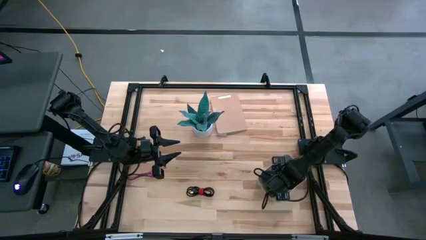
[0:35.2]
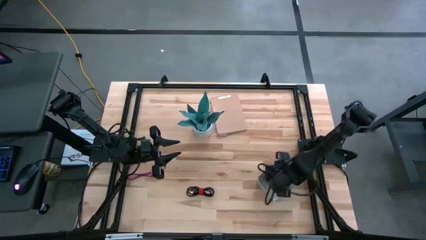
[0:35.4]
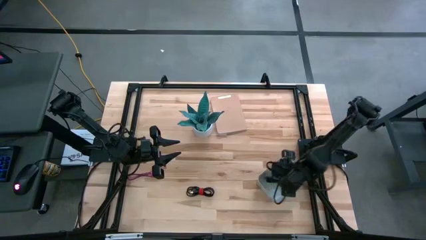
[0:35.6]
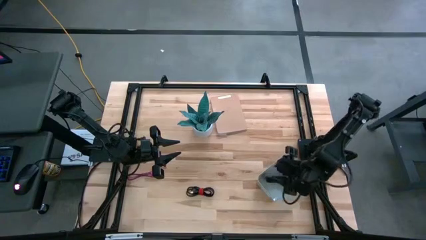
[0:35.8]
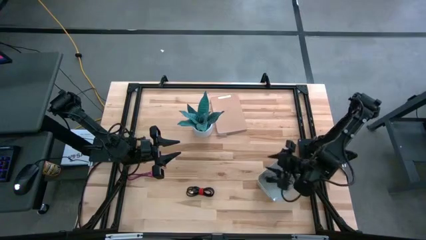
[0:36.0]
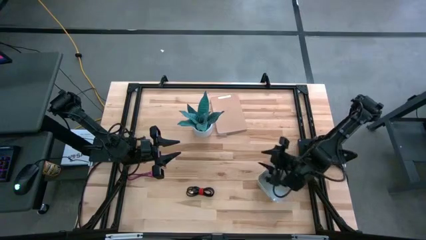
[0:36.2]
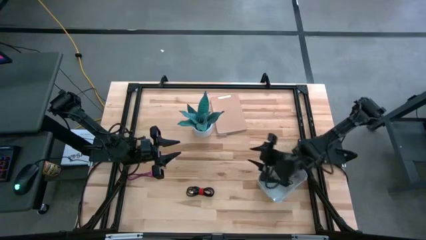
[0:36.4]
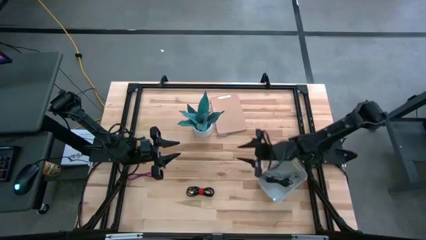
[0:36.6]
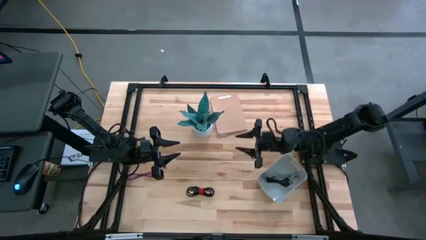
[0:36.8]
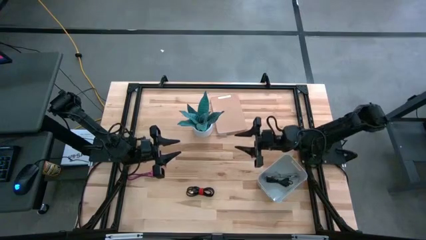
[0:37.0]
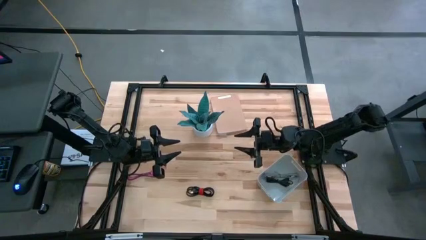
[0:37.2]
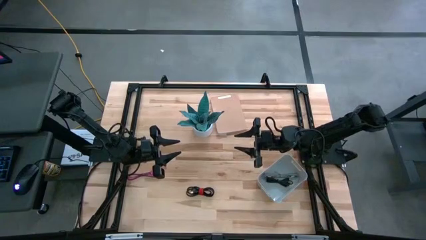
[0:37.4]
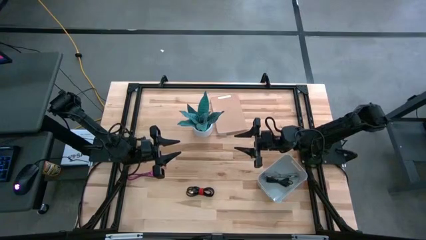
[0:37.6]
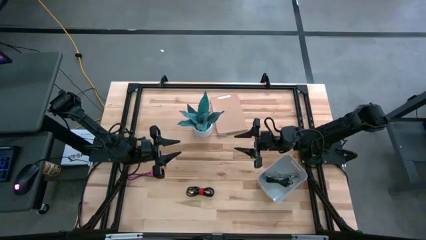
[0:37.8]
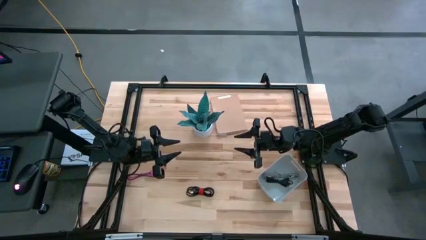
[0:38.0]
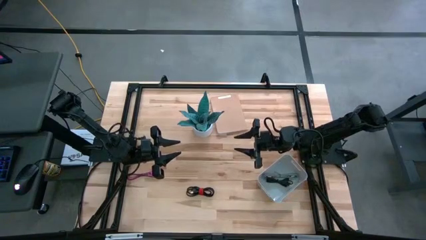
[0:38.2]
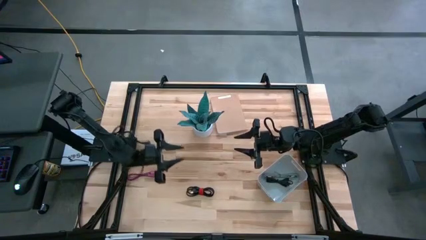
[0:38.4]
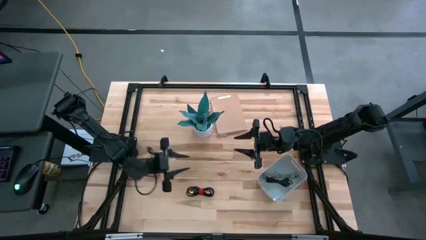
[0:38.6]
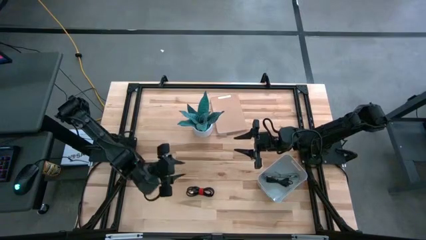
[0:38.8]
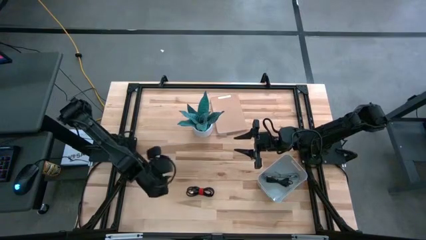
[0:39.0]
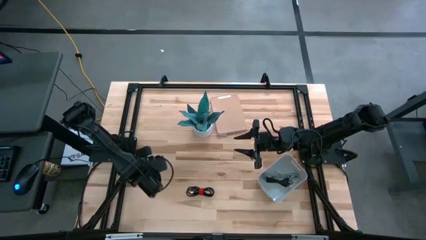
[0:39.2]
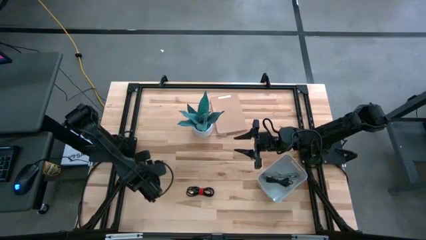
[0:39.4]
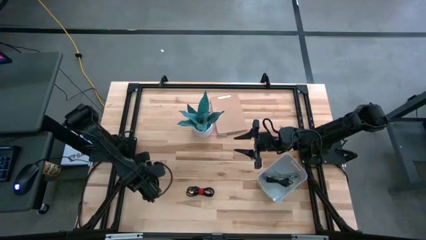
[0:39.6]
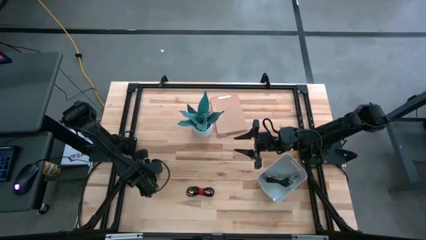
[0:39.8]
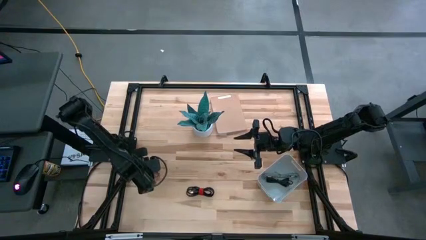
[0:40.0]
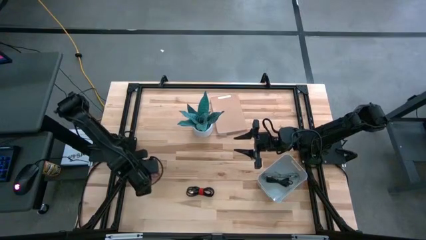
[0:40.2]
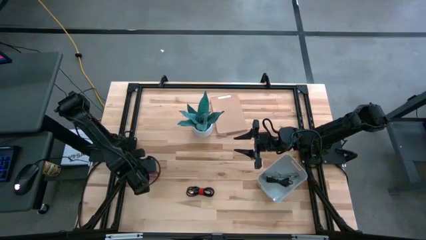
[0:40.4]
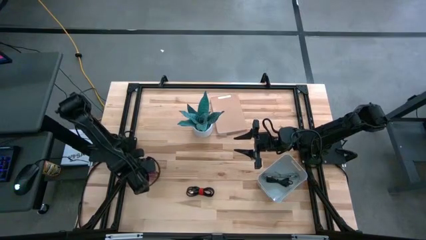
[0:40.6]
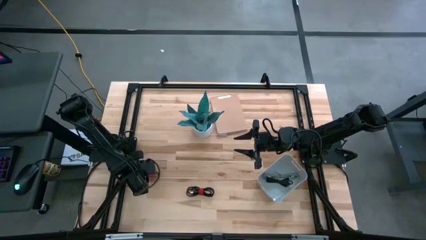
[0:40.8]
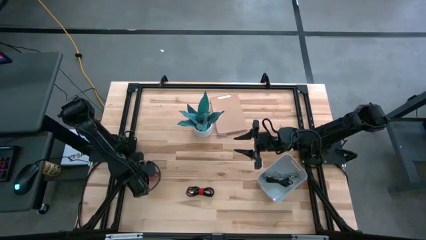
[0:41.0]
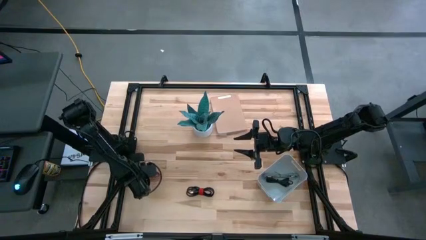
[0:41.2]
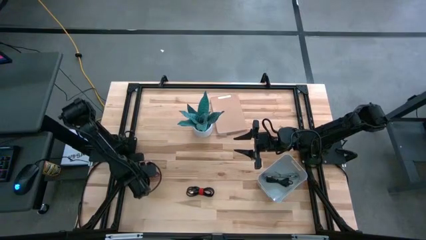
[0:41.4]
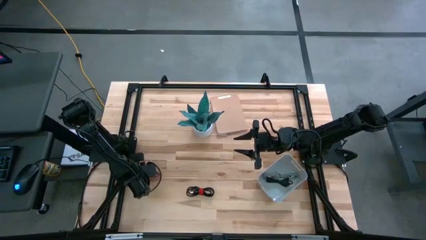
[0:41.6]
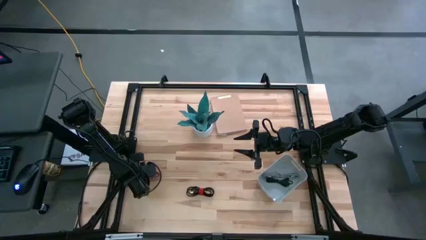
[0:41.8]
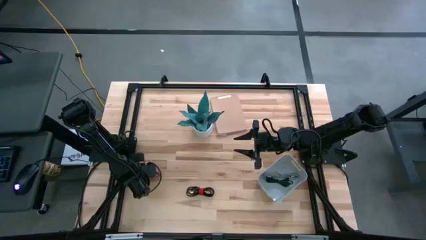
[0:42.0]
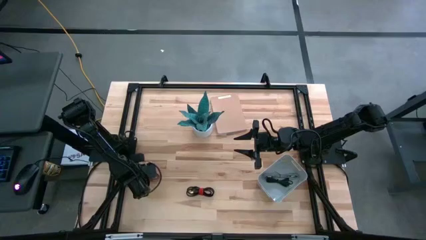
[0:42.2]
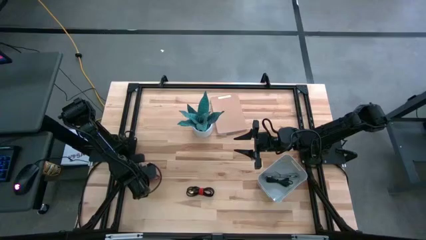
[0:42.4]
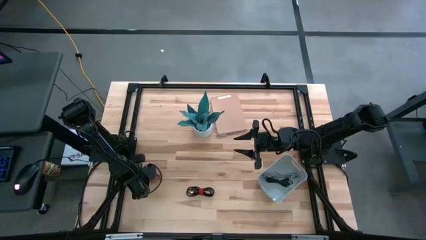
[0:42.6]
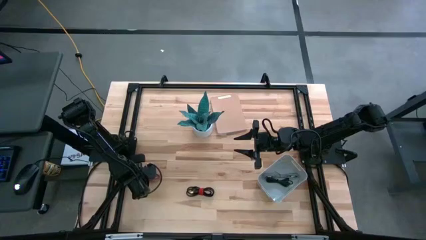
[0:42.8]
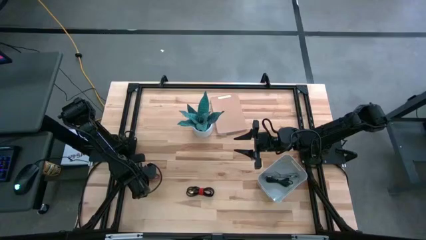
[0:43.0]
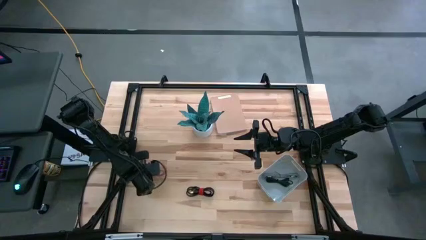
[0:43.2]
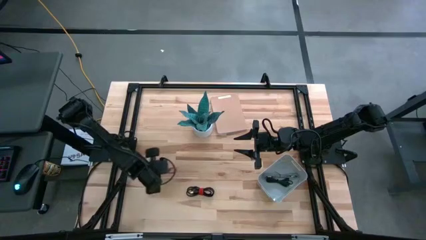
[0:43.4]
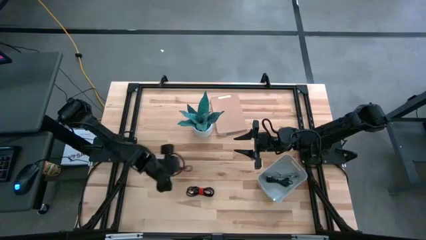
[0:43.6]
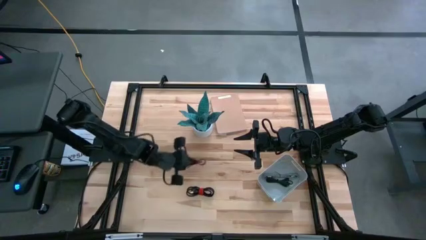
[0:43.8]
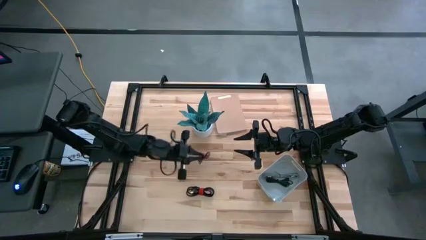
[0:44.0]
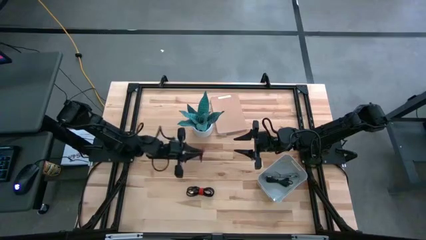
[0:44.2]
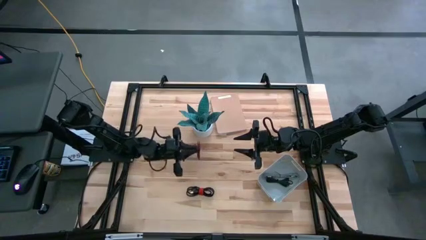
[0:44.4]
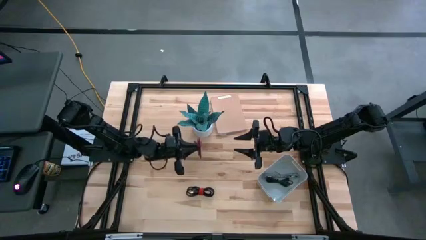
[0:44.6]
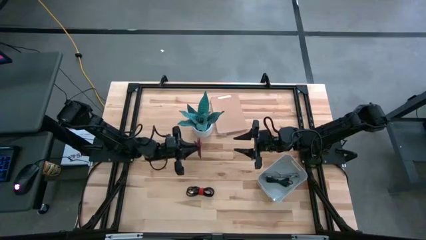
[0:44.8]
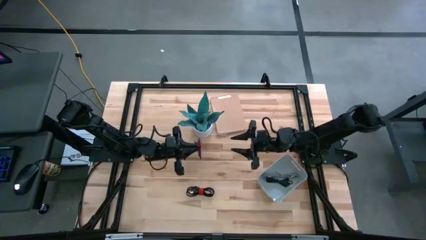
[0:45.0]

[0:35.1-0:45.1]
Task: Pick and place USB-C Cables
Put the pink charger cable into the white bin

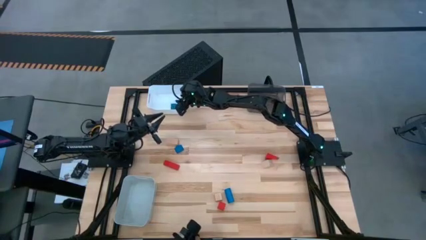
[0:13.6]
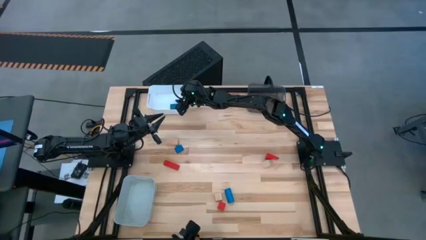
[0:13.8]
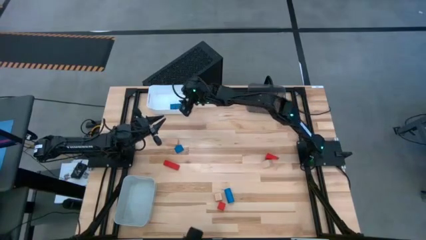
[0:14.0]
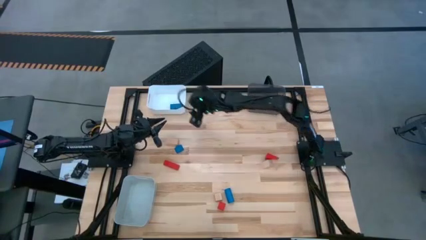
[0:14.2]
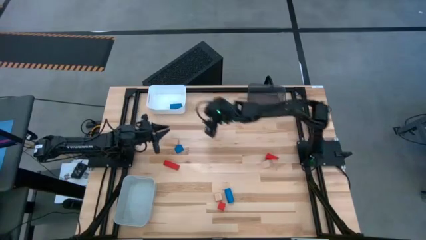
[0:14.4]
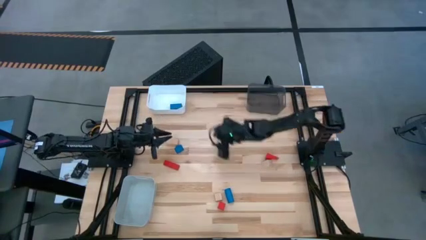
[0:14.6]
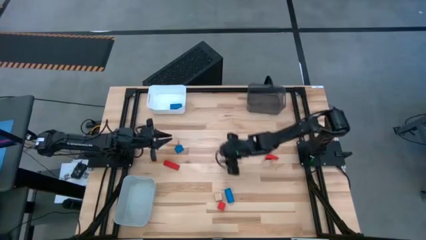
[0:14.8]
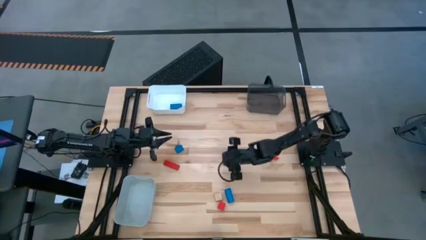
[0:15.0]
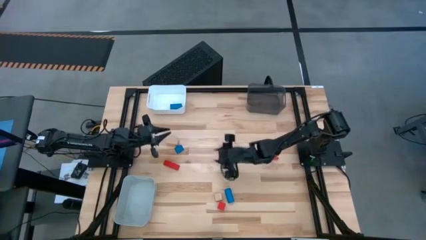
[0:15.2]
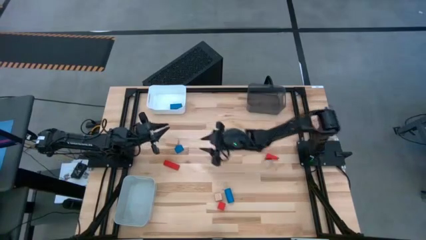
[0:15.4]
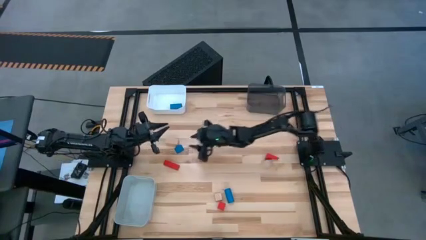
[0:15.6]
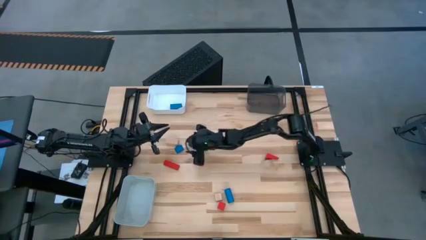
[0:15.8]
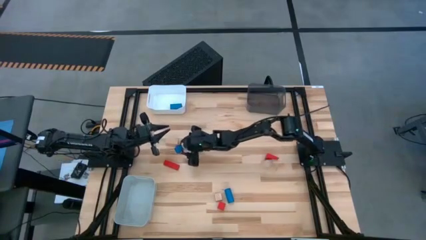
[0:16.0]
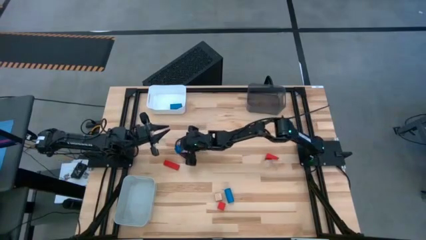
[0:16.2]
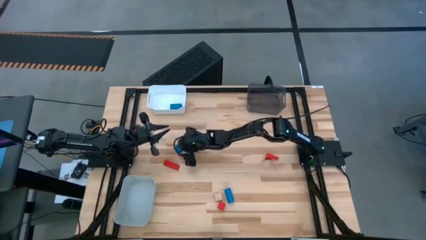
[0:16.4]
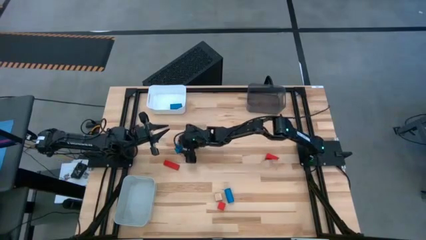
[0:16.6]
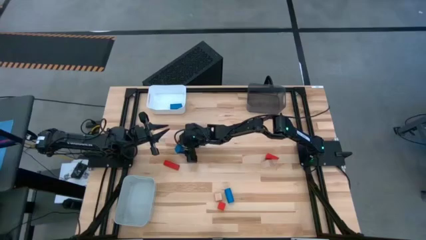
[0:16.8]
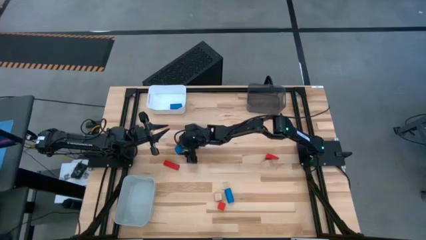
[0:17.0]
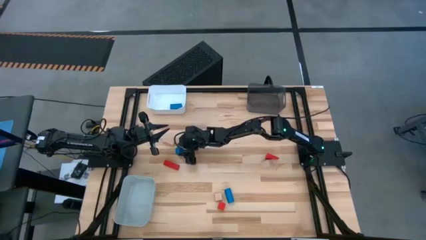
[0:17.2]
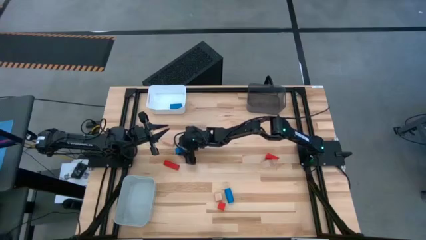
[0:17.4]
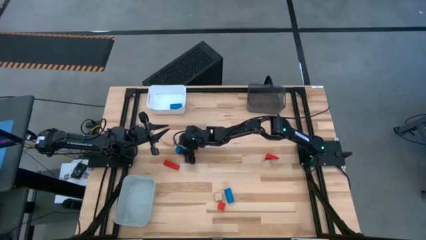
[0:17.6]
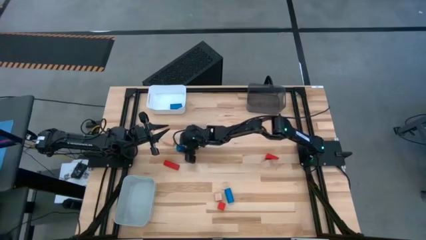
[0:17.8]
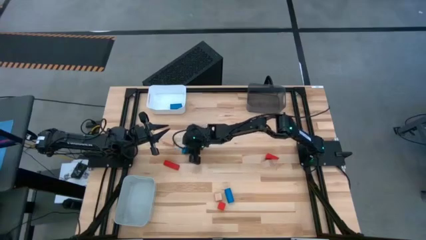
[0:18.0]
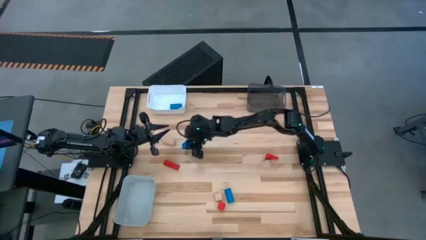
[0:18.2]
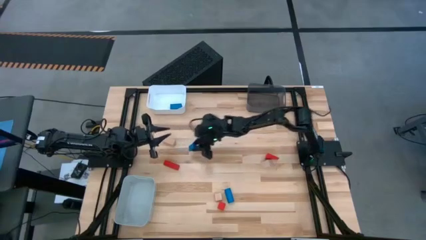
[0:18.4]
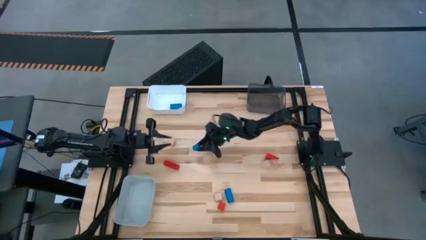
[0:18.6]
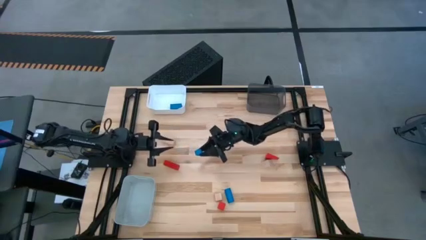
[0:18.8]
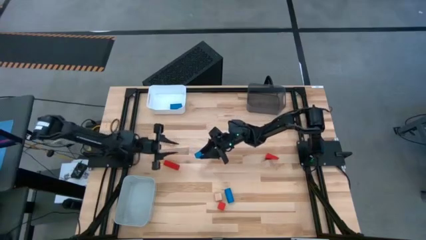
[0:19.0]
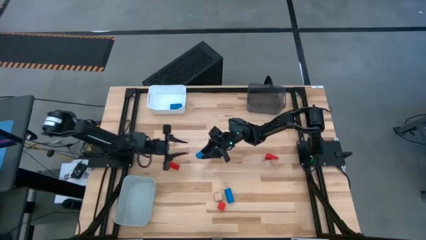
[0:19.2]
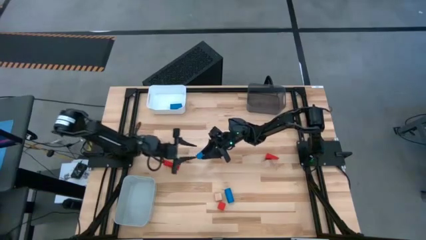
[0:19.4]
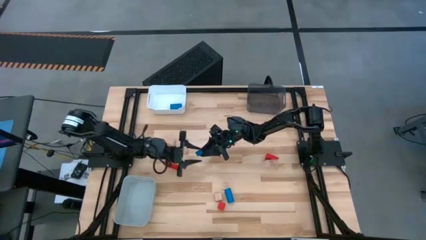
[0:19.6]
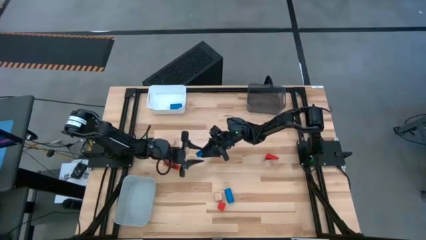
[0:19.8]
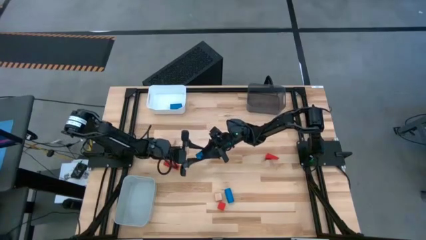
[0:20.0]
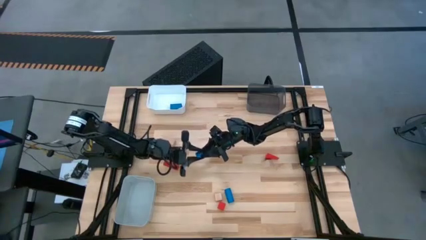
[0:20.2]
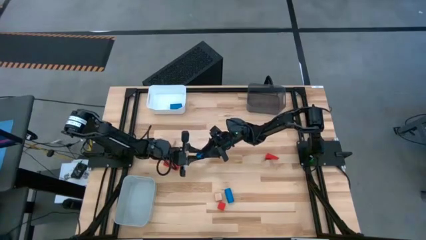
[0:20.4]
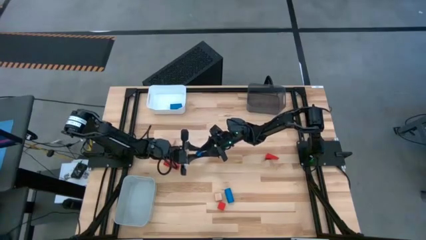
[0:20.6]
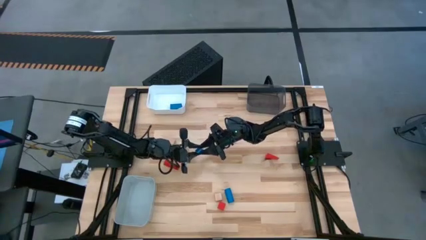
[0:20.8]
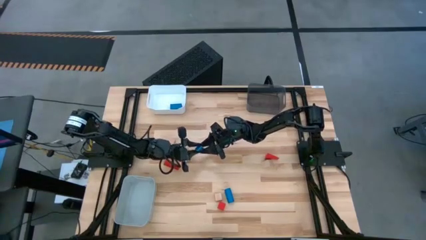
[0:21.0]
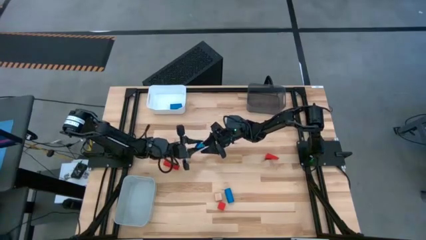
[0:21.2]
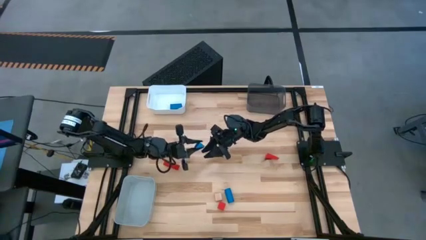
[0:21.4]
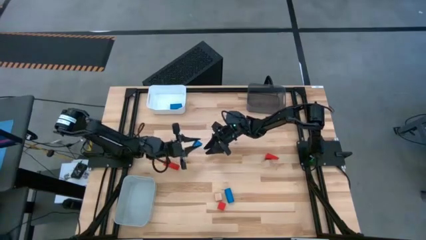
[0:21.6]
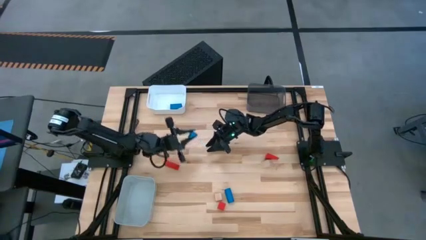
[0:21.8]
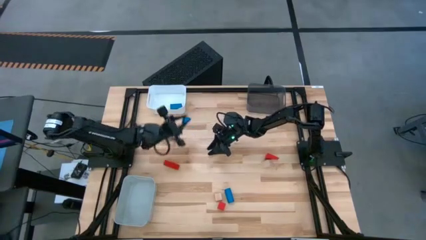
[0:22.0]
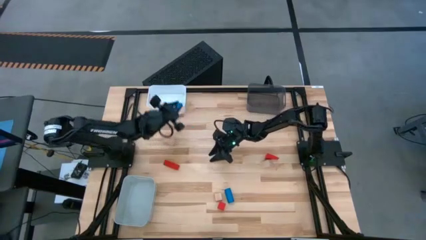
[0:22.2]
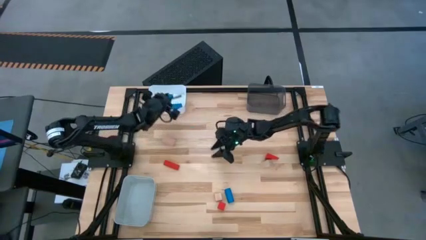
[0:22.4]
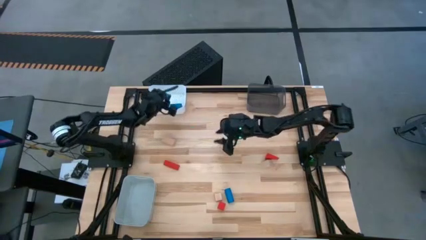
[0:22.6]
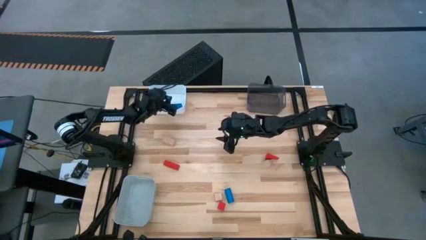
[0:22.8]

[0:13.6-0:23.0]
Task: Sort & place blocks by color
Put the top blue block into the white bin
